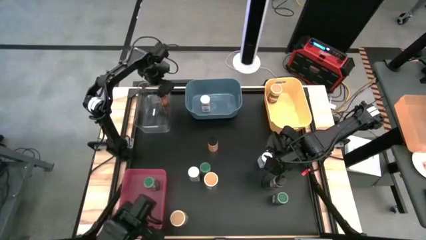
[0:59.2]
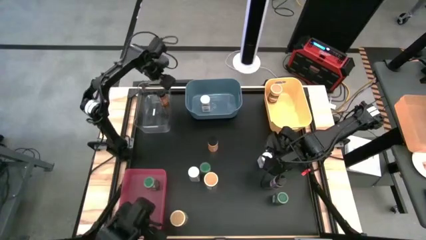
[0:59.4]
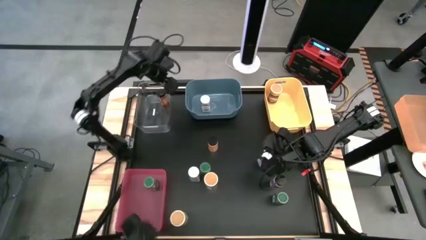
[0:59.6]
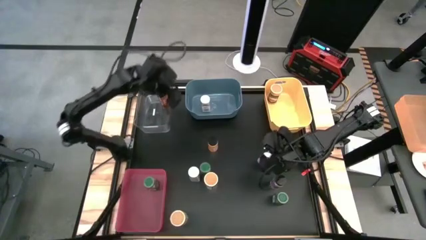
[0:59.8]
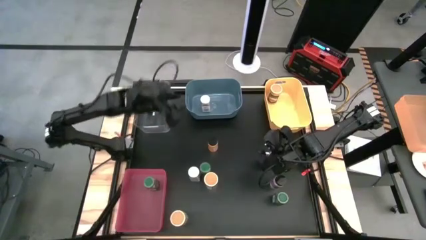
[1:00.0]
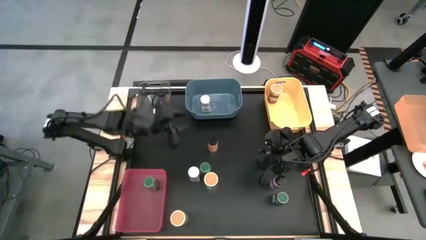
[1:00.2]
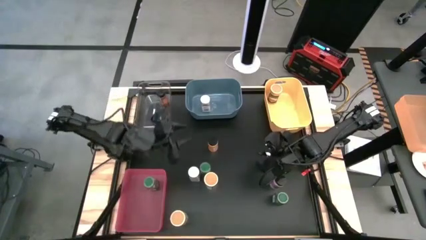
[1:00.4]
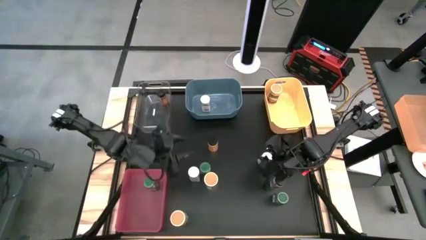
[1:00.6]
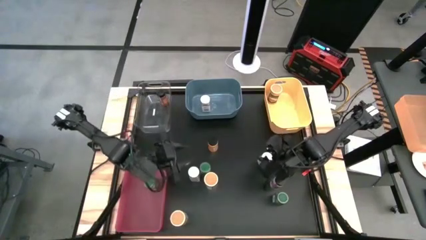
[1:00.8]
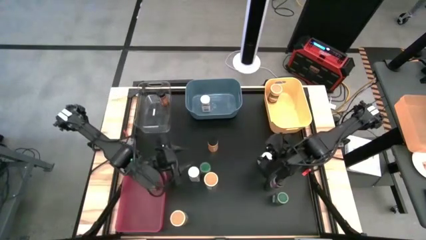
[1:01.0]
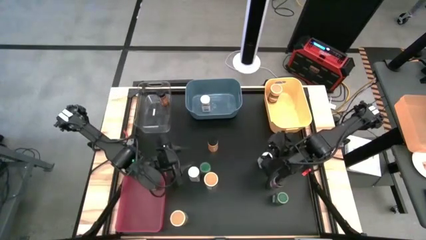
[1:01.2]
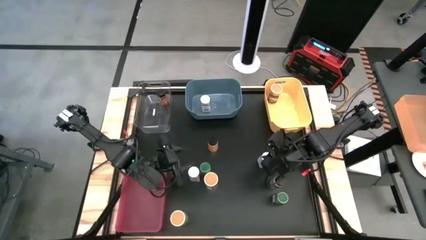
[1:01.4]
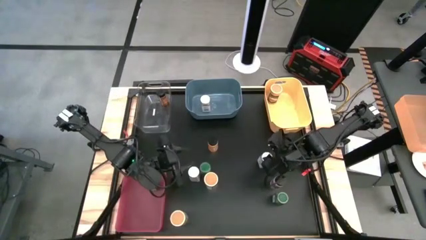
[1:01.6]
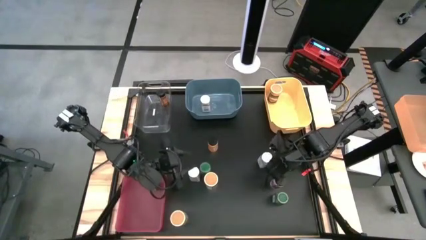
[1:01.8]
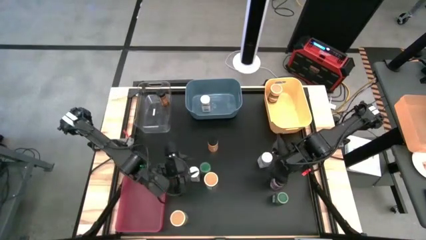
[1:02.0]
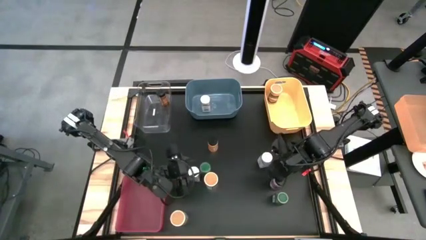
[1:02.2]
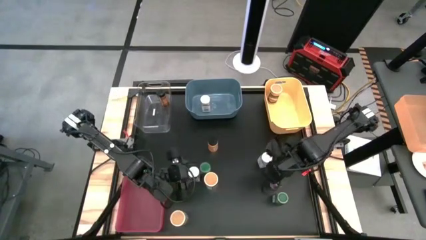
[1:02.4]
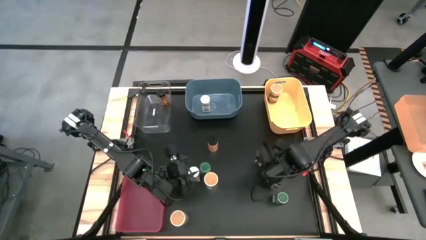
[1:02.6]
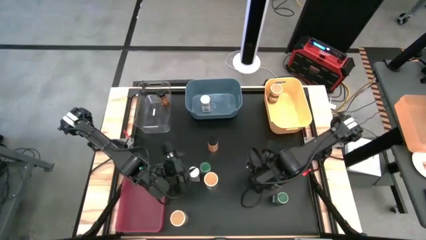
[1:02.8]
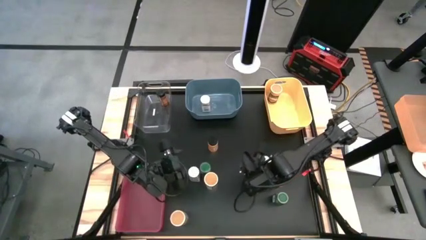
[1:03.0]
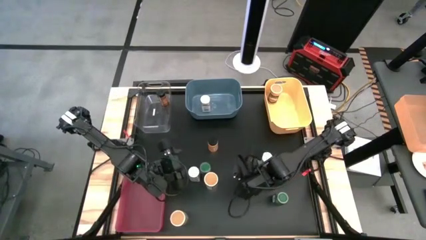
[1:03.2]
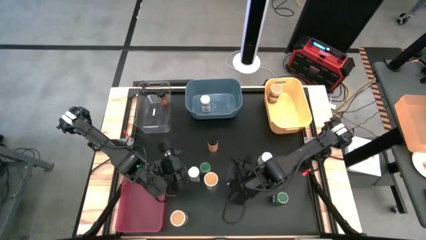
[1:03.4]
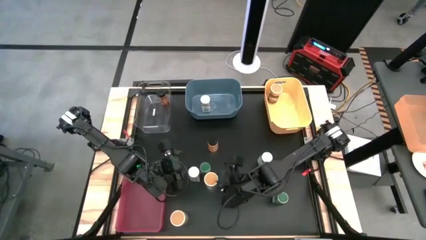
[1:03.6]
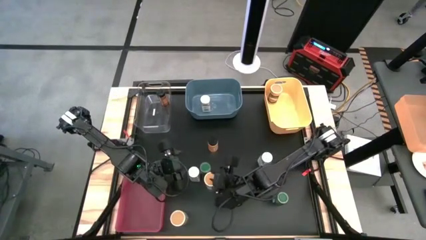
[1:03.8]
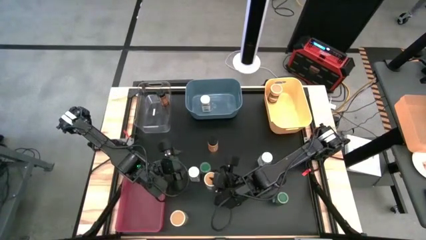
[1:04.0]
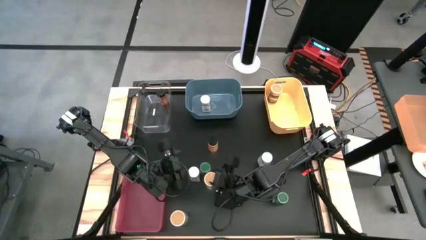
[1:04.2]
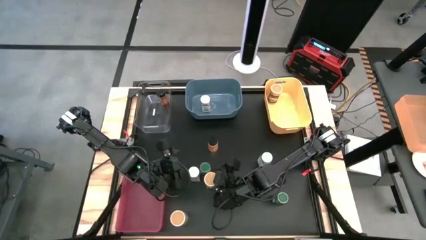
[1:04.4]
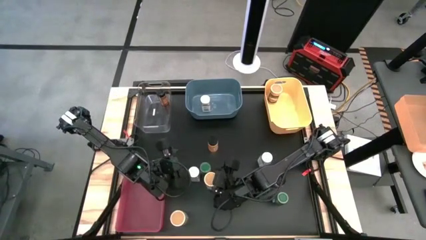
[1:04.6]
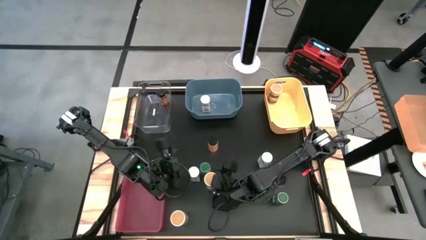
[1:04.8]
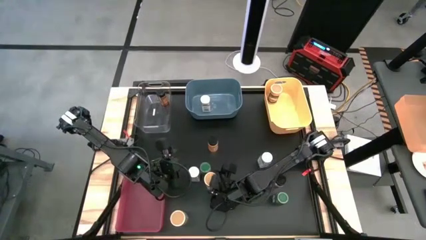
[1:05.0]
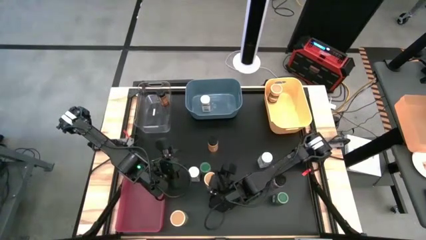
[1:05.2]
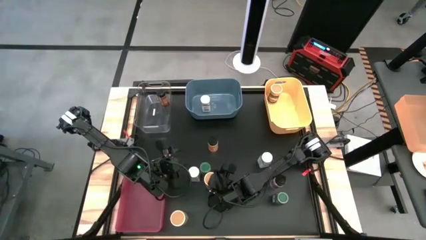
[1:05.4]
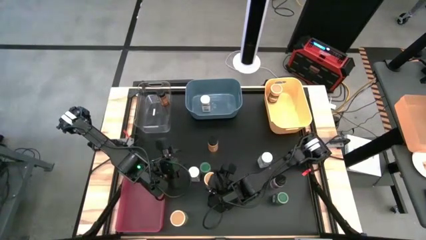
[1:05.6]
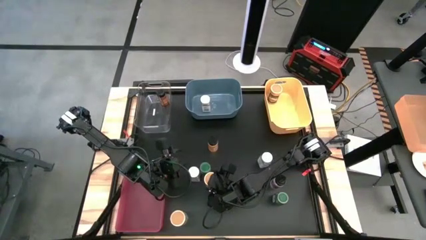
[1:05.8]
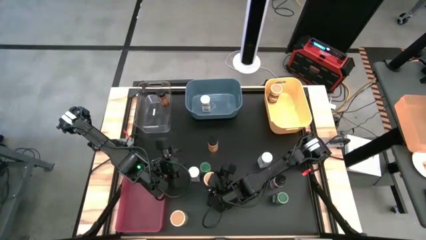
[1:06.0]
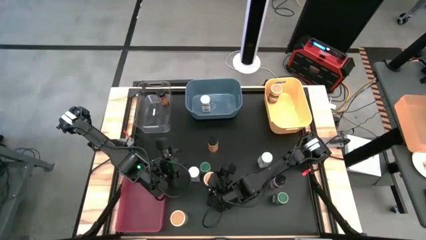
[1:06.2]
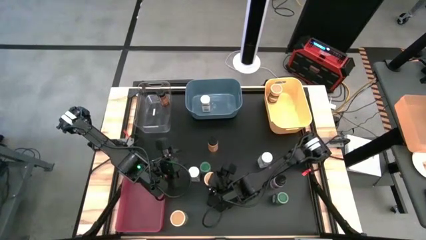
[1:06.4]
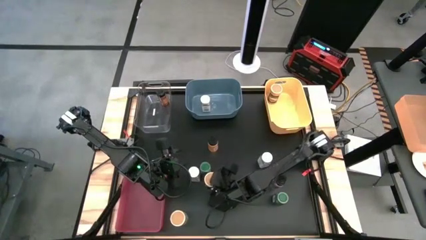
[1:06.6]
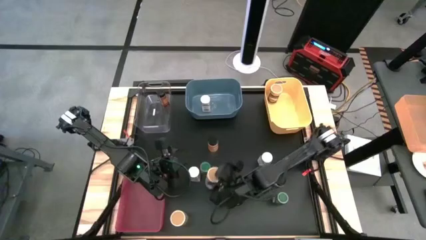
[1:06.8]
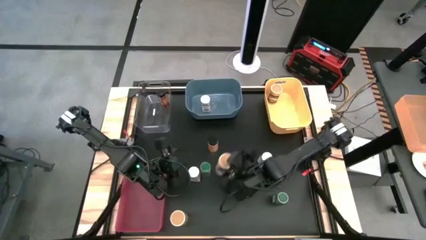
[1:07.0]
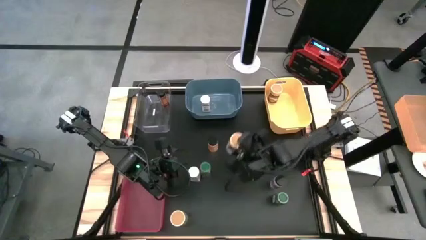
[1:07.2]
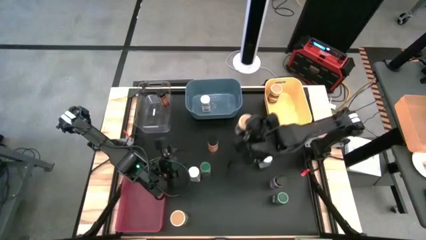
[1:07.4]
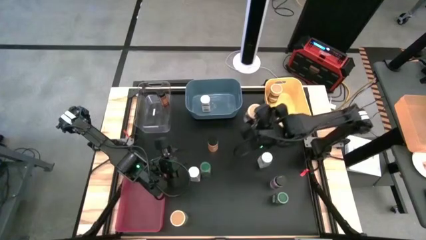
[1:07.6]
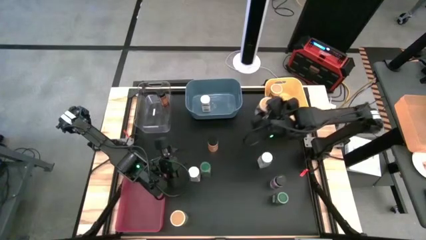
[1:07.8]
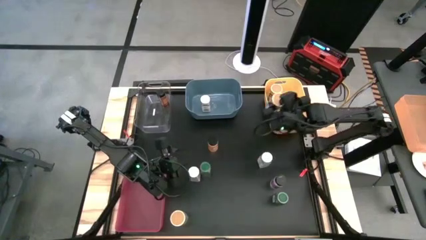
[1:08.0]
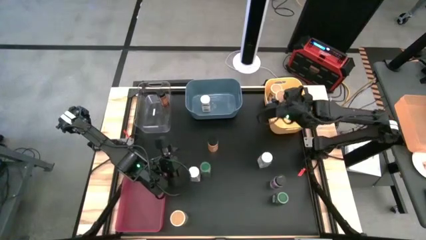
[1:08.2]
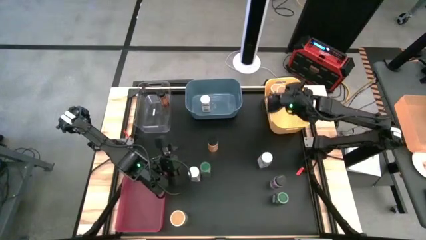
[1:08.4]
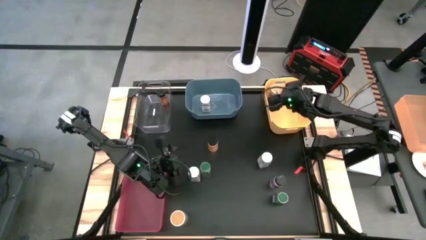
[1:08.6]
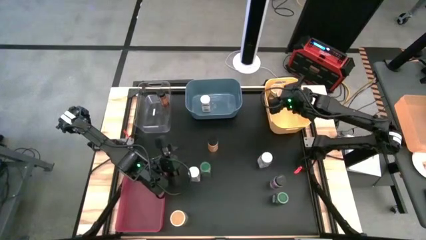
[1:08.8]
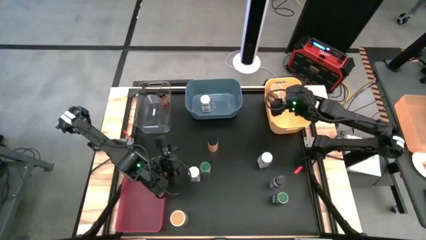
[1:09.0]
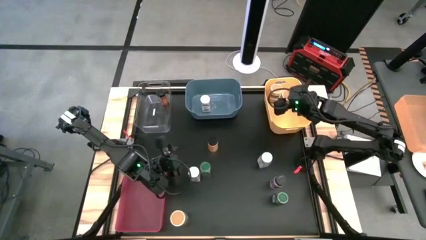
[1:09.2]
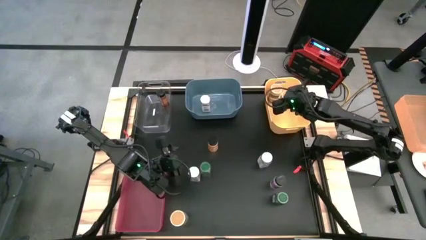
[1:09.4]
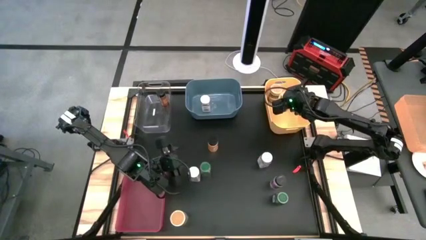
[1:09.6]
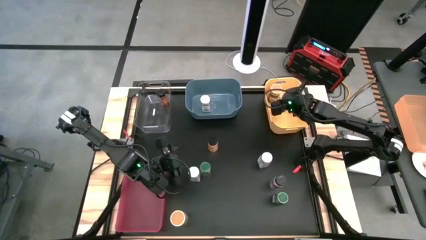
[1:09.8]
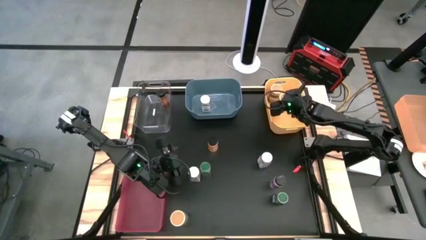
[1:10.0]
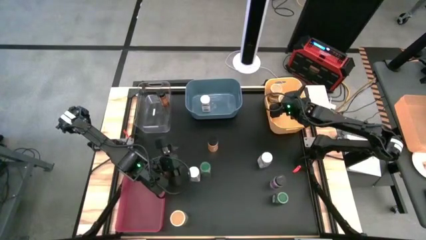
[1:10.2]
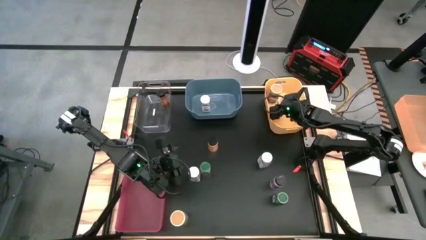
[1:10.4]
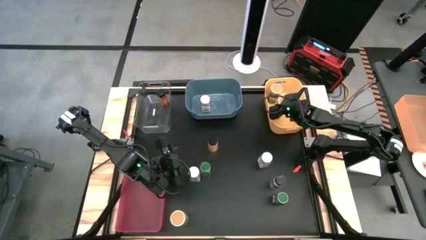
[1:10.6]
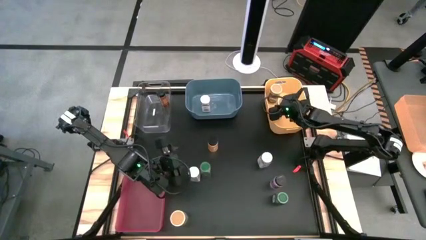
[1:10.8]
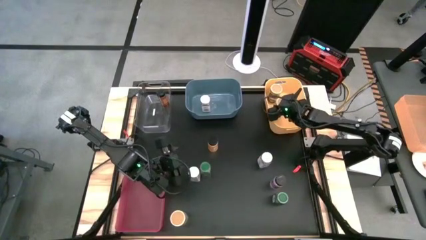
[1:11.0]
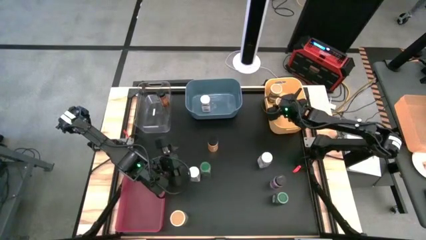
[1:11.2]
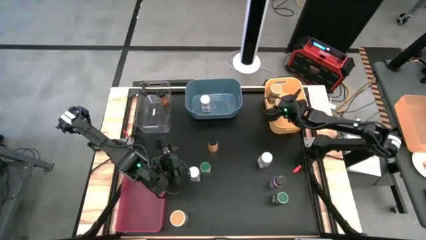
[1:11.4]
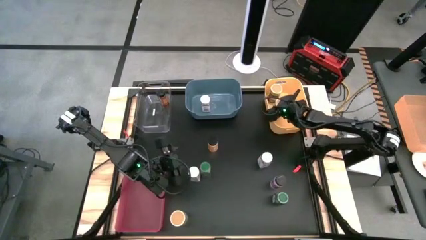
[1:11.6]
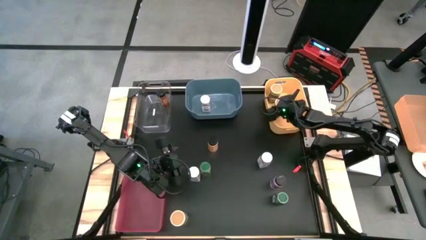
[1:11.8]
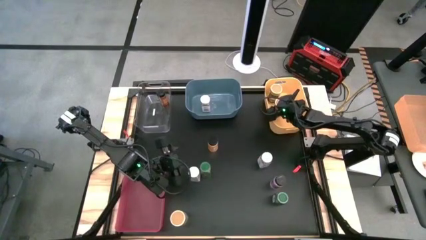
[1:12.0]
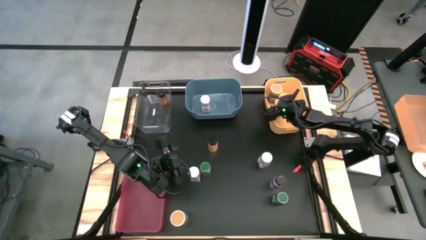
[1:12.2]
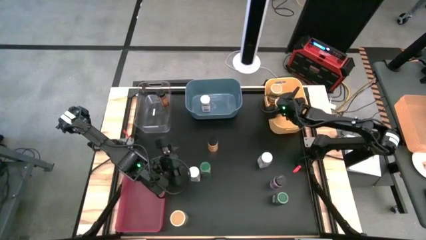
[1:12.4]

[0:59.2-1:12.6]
Task: Sort spices by type
Put the top gold seasoning bottle into the yellow bin

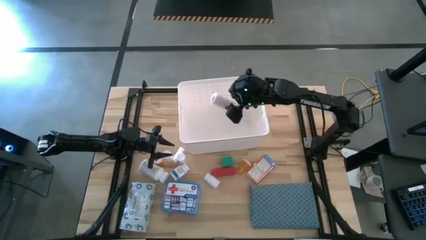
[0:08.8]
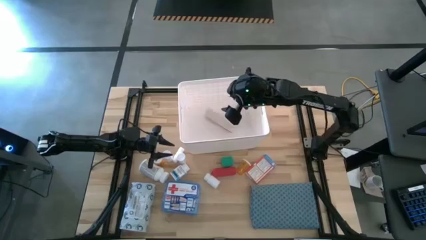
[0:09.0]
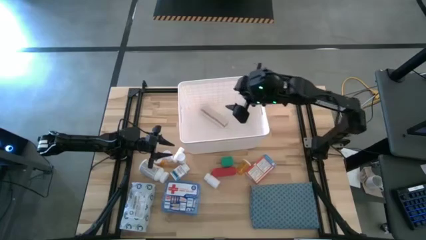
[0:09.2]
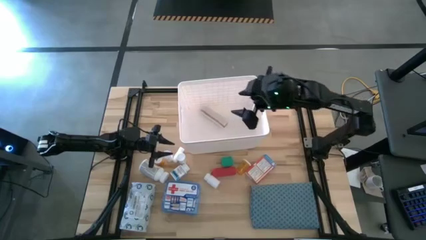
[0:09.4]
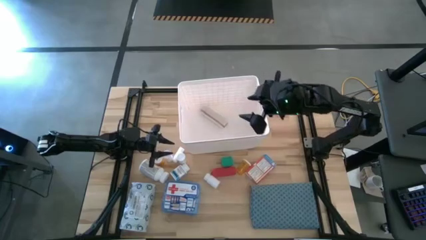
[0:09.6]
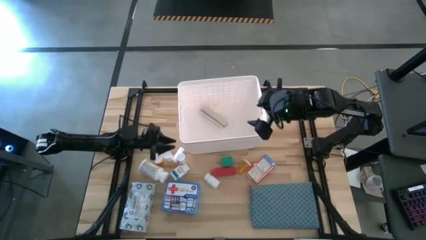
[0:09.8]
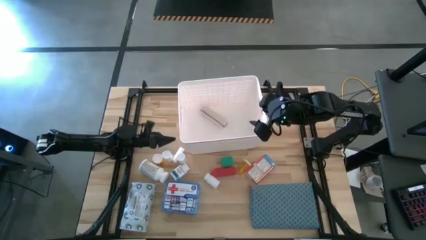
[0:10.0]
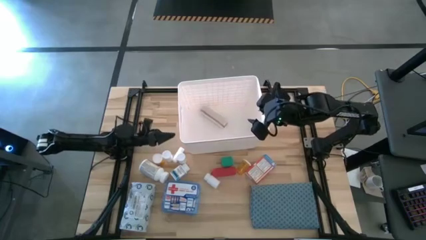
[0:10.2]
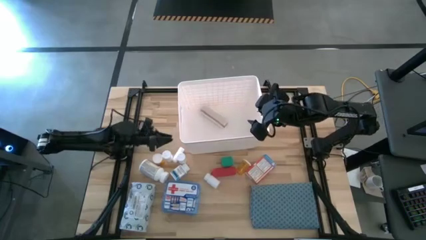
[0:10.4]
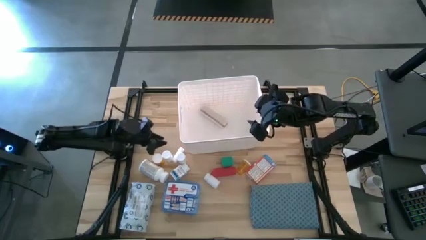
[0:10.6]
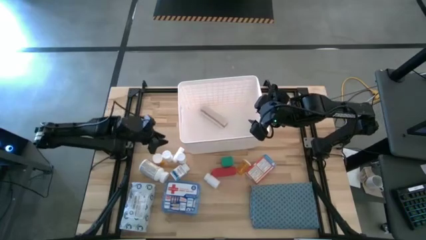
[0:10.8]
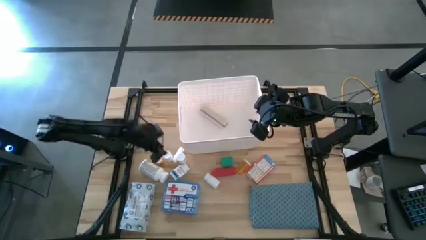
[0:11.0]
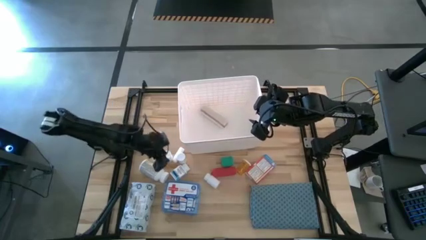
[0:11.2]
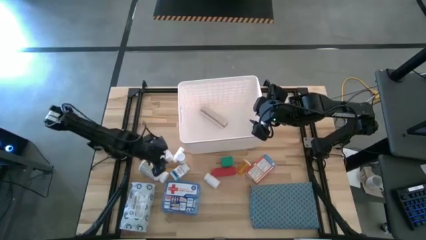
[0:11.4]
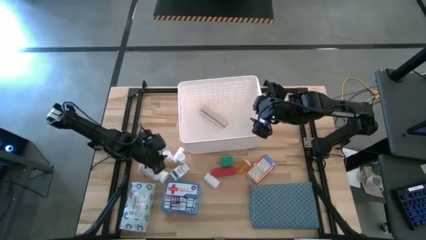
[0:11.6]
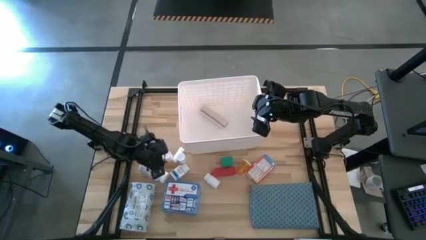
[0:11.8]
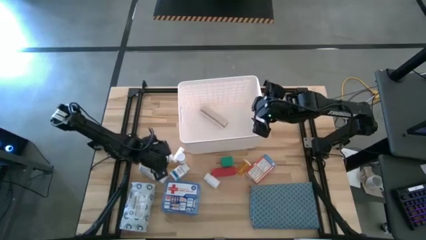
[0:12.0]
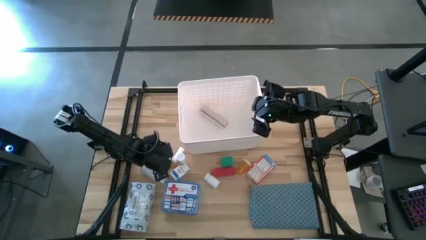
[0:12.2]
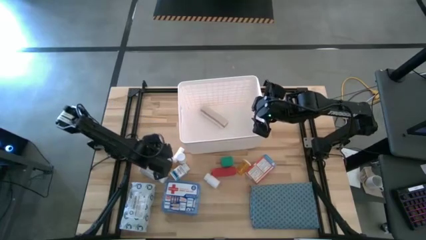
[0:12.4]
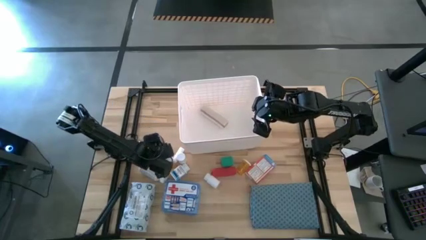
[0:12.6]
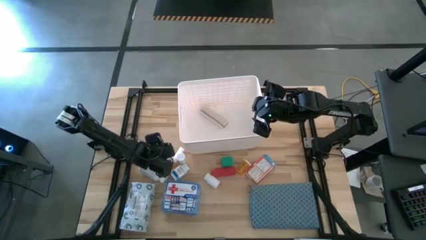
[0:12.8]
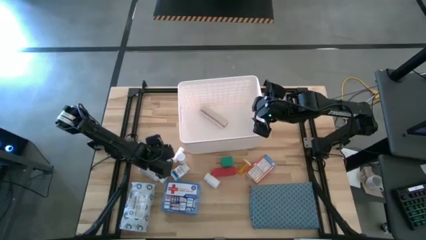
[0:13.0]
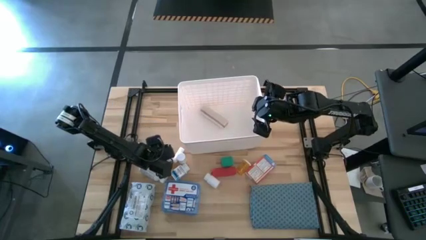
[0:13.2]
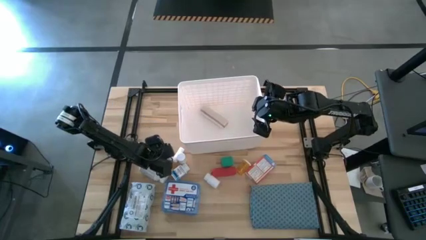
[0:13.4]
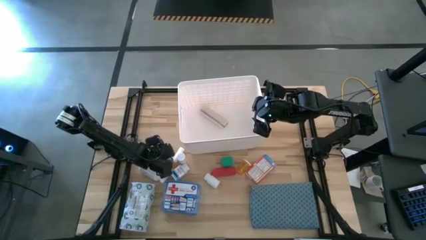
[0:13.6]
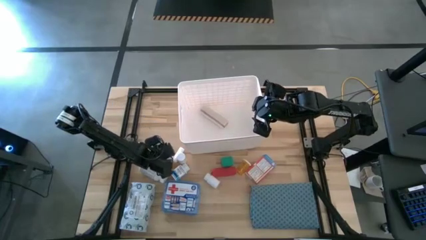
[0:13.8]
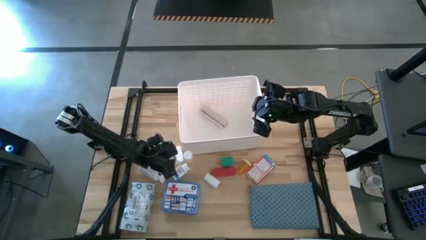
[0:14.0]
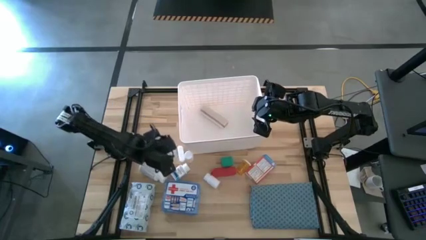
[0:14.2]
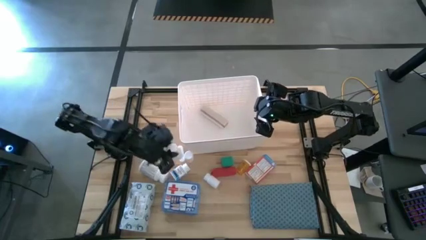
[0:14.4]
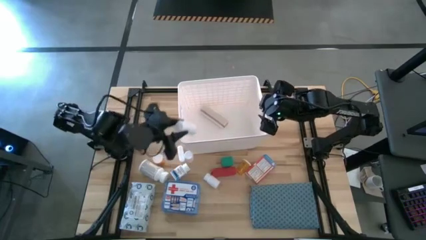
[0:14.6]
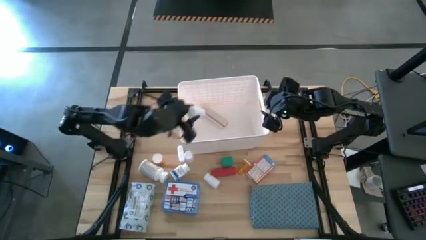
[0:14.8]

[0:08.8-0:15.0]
Task: Pick & place medical supplies in basket/bin
Put the left white medicine bottle into the white bin
